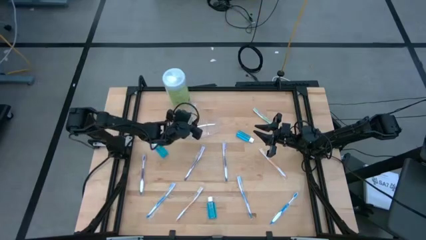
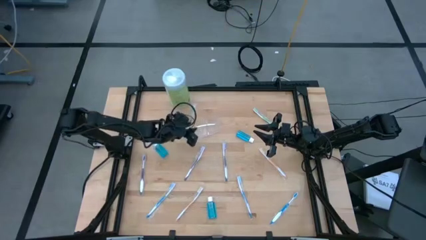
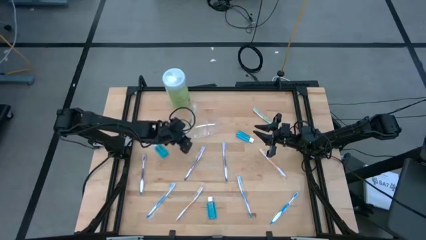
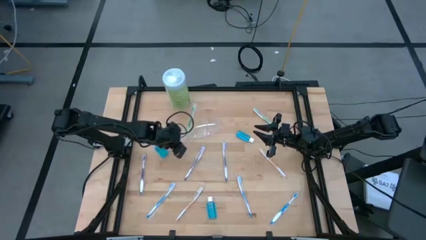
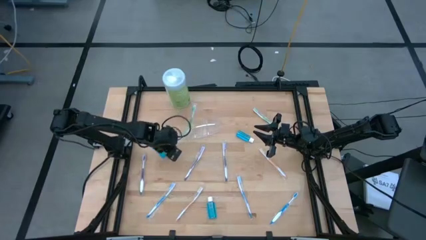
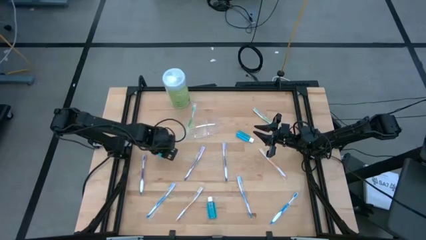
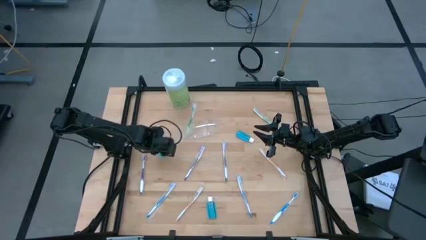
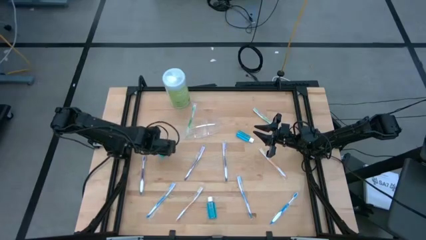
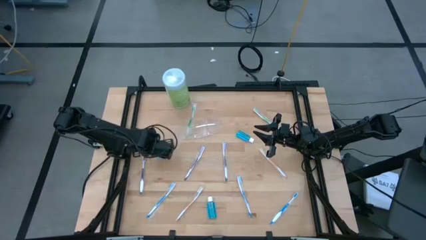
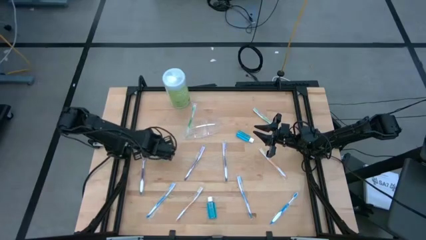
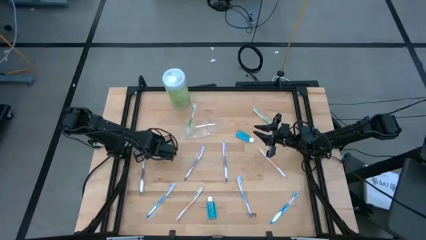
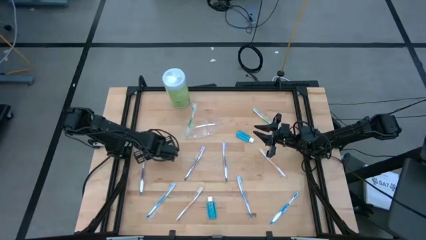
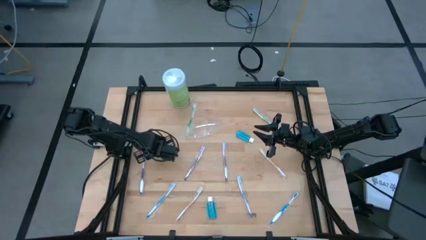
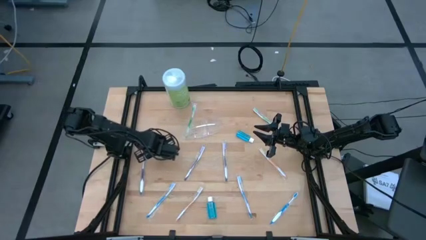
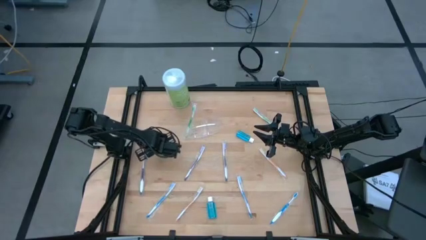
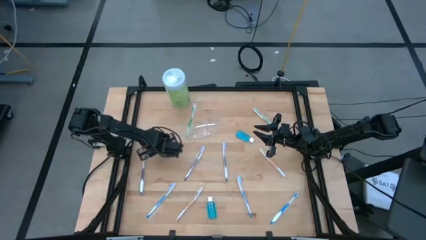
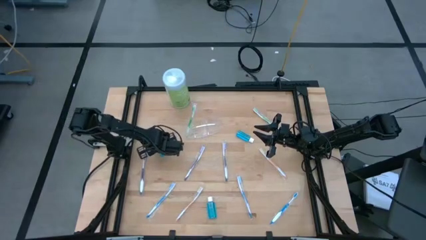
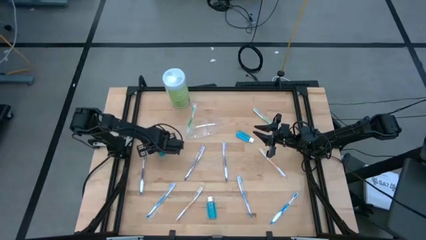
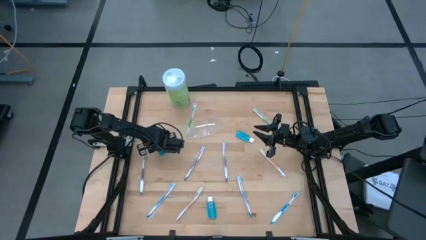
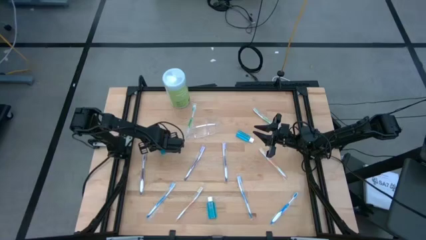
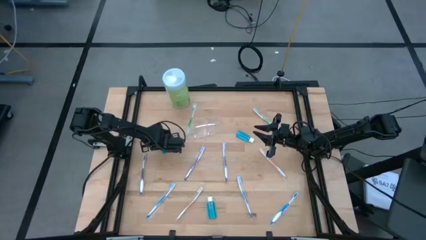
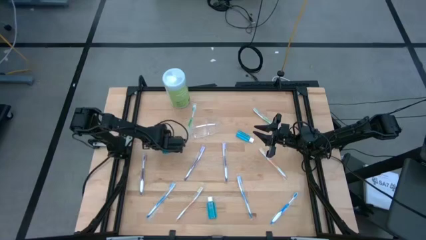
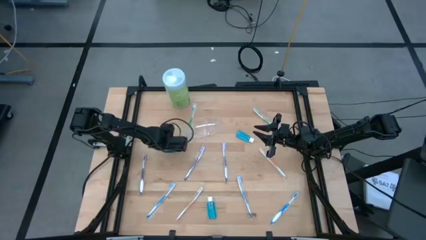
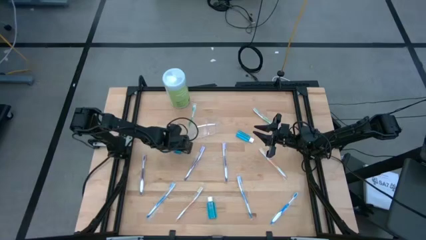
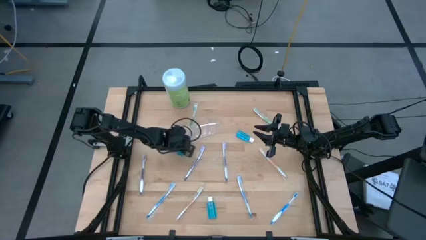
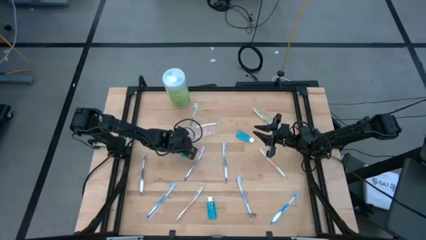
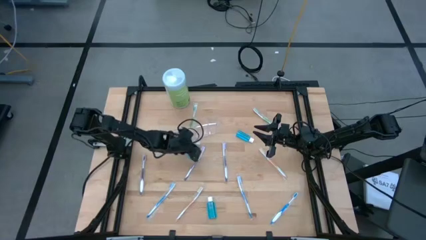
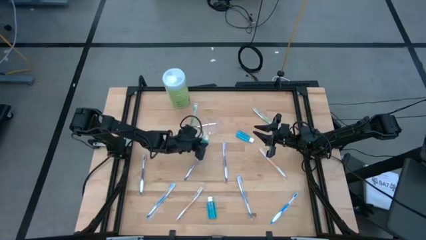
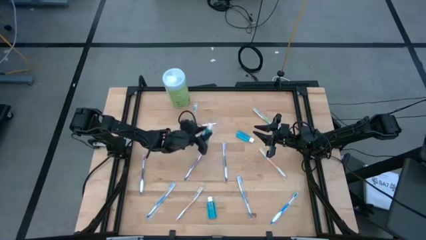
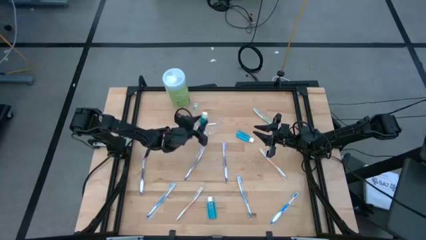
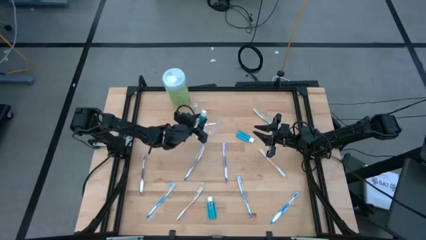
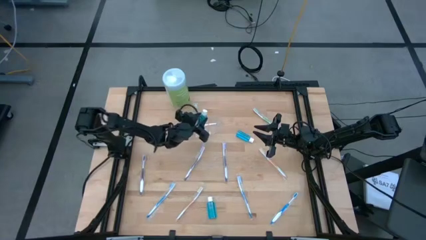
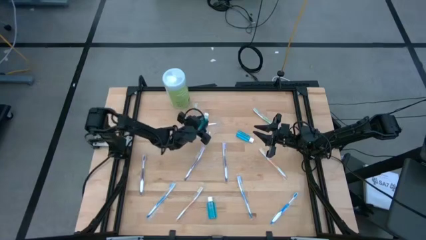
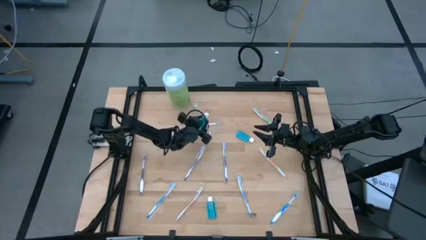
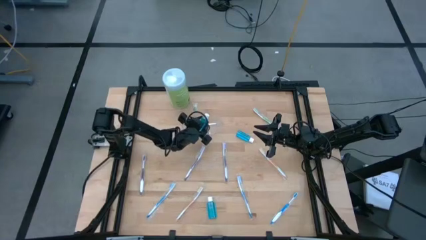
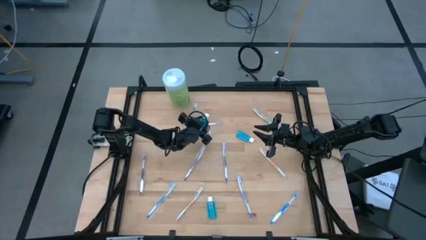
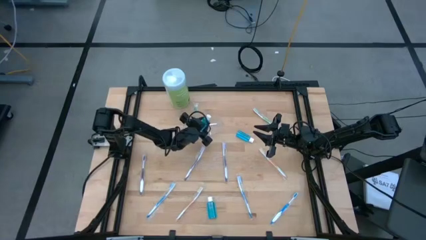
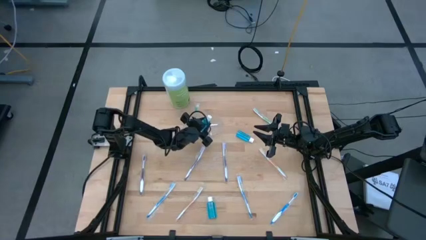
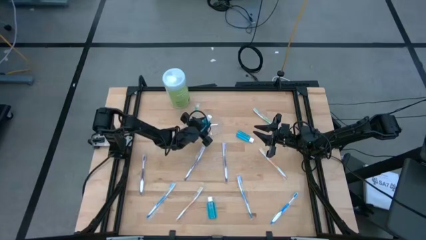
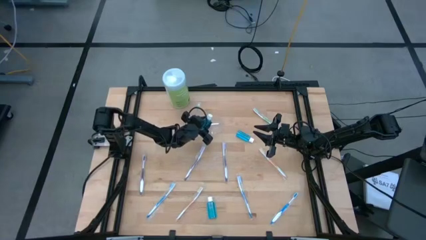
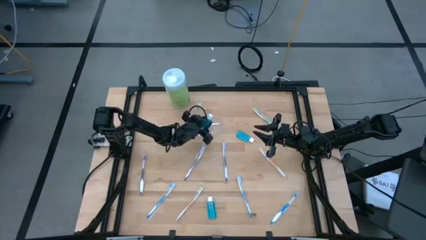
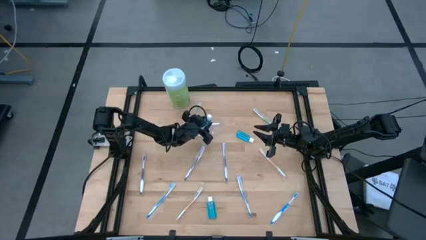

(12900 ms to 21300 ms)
Task: Pick & Place toothbrushing station
Put the top left mouthwash into the transparent organizer

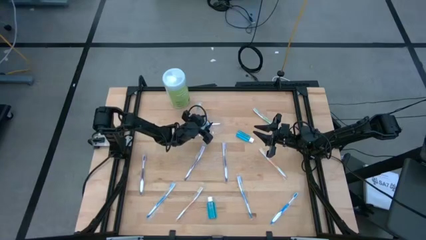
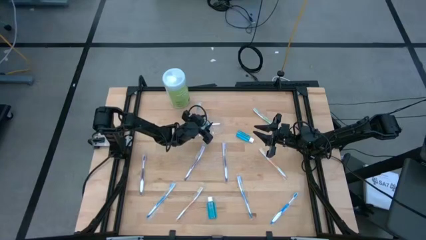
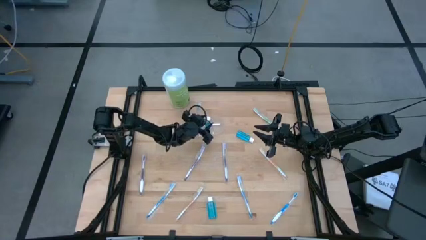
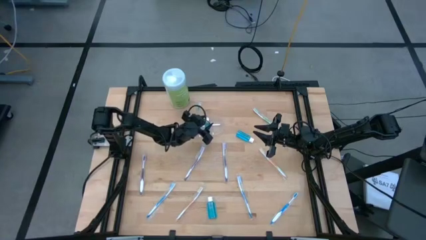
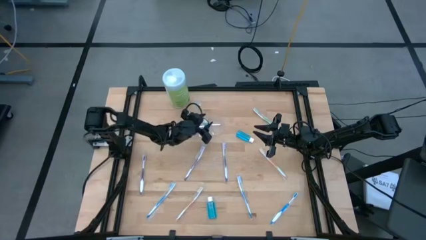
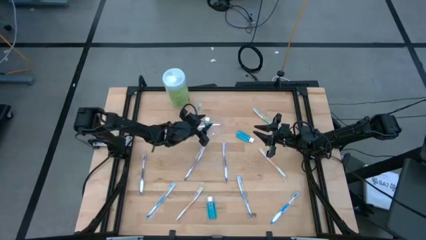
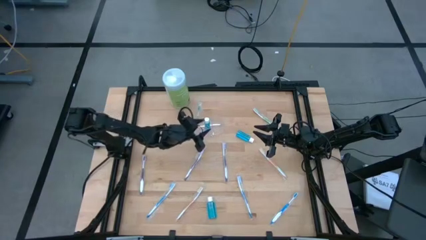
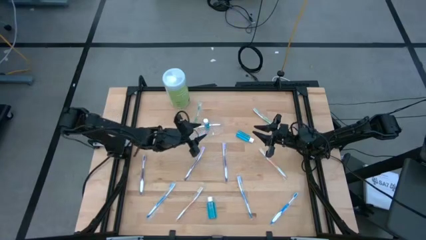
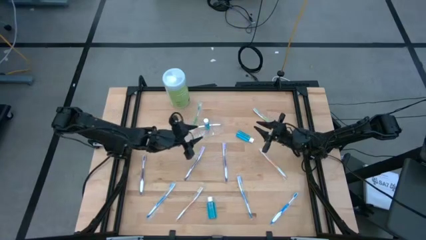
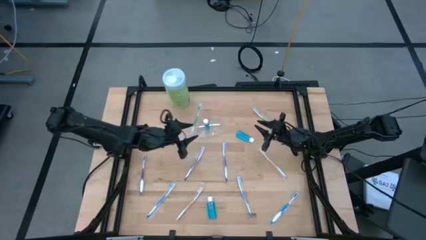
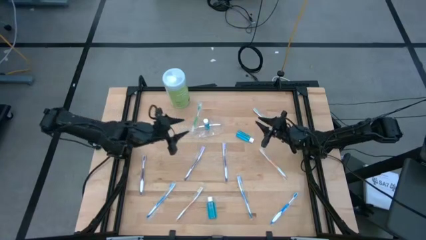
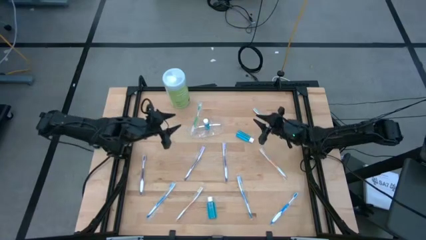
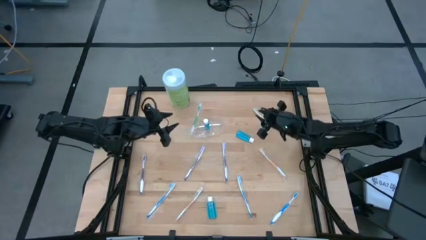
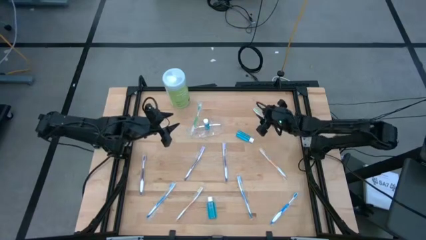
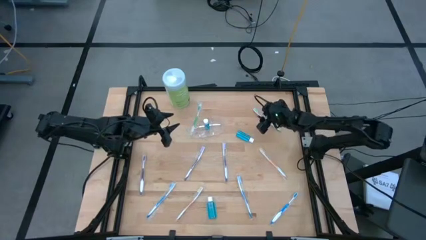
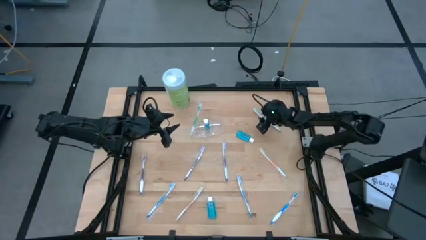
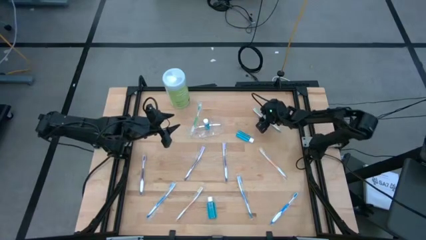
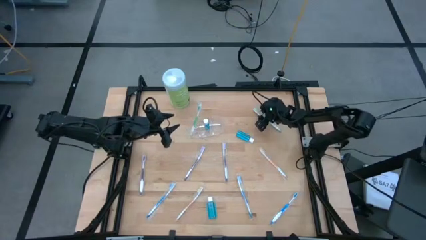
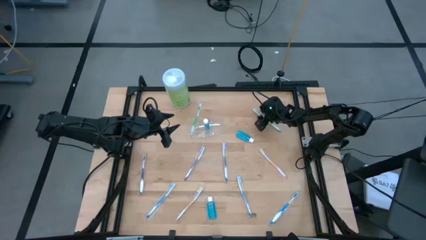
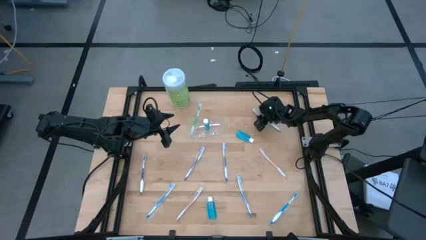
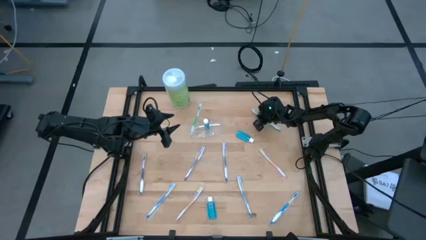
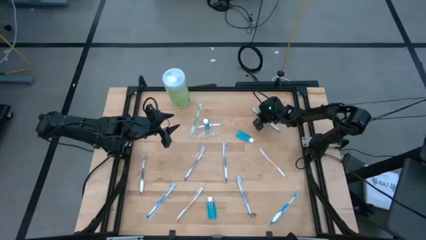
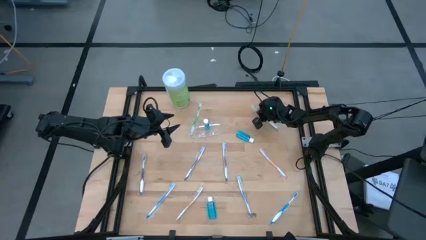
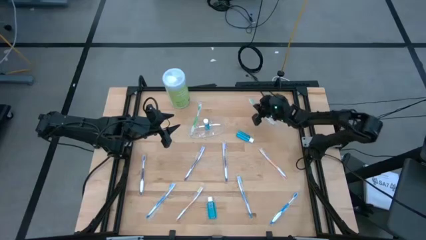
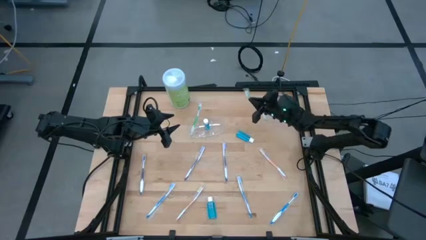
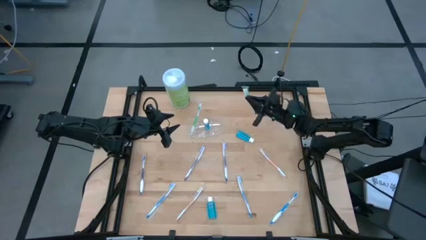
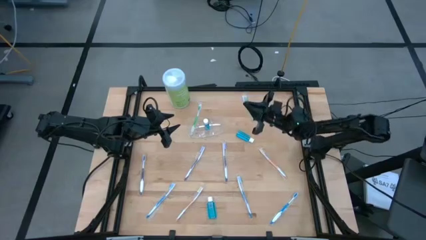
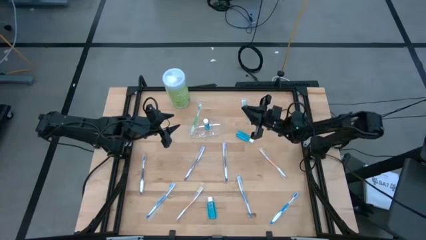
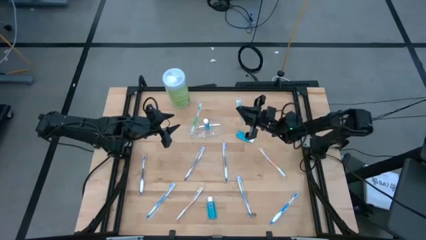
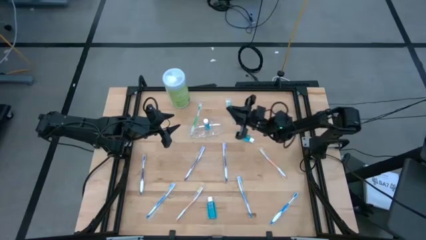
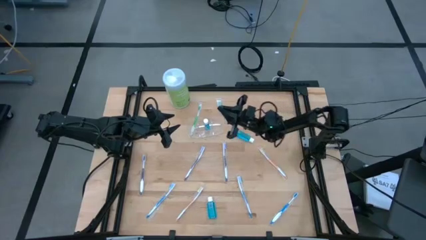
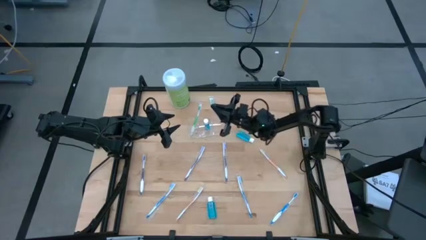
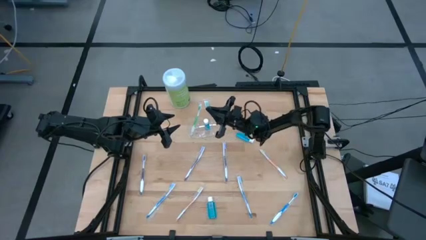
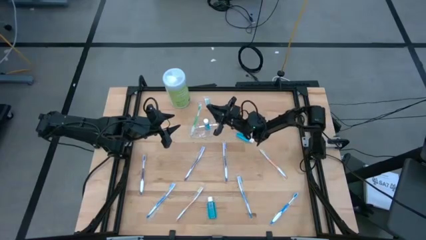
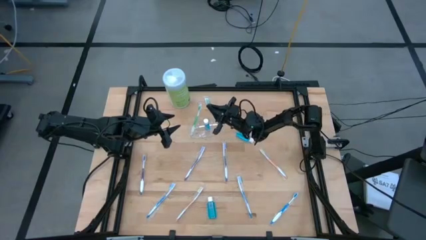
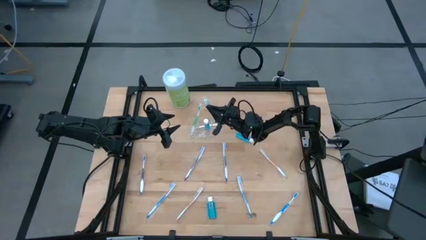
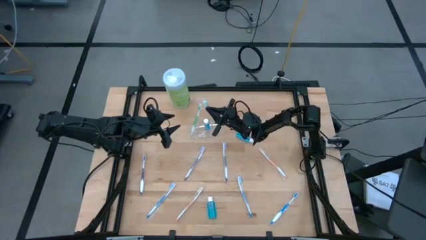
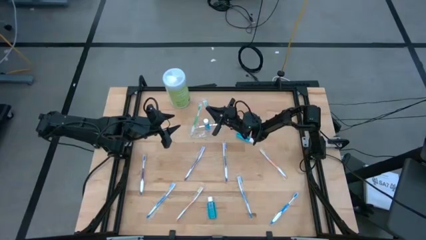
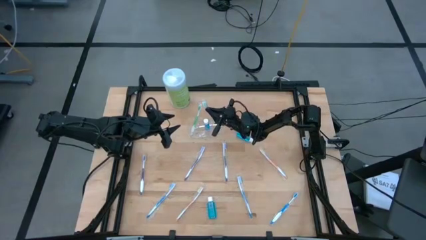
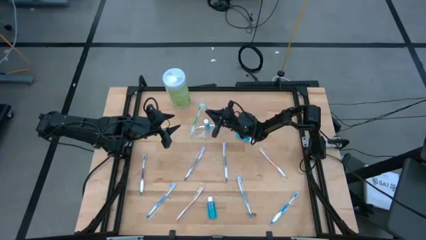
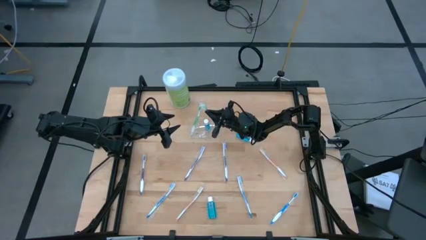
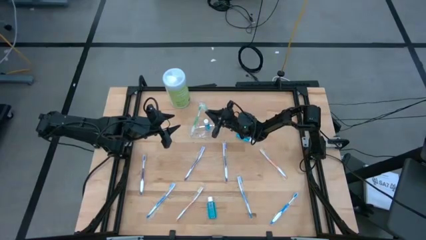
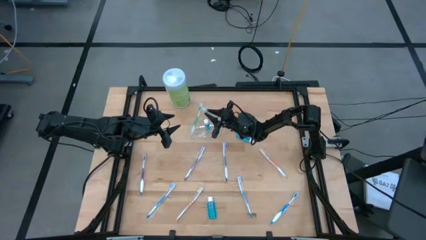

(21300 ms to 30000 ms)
Put the green toothbrush into the transparent organizer
